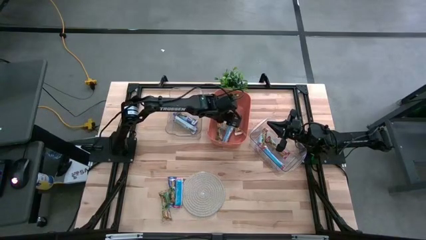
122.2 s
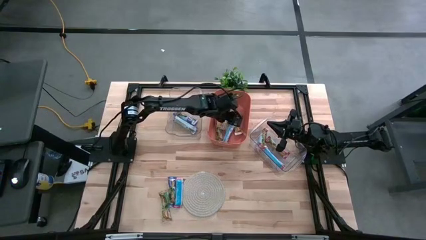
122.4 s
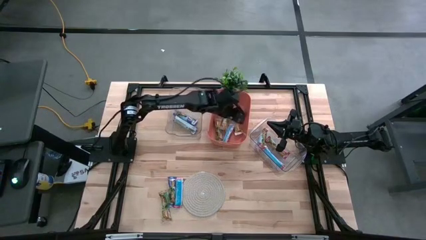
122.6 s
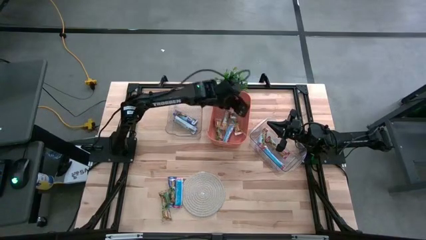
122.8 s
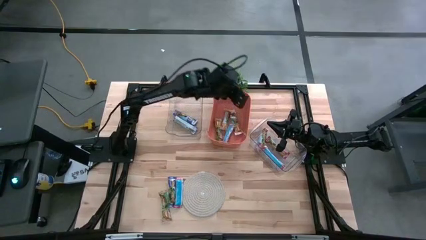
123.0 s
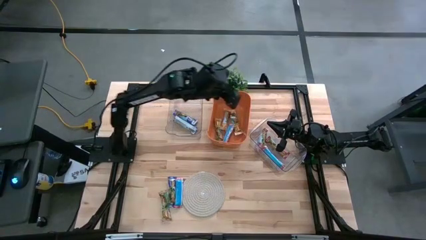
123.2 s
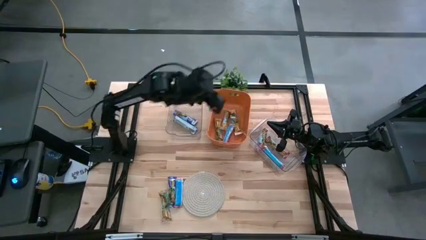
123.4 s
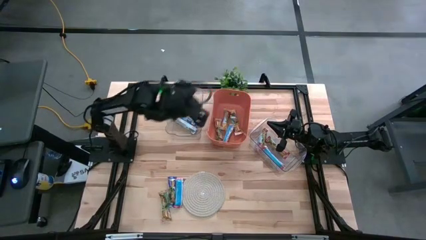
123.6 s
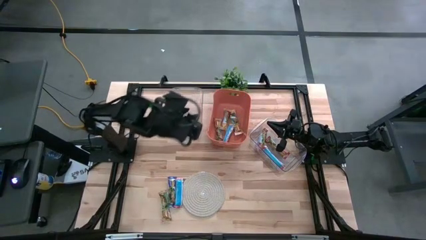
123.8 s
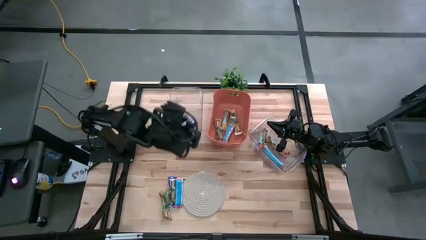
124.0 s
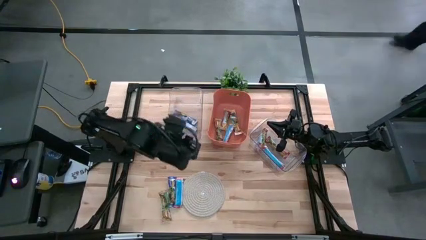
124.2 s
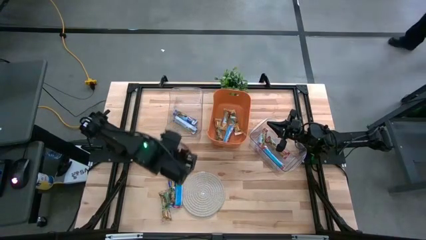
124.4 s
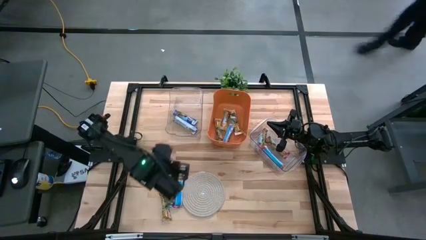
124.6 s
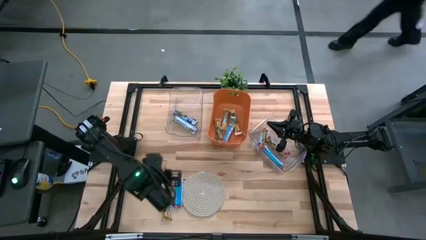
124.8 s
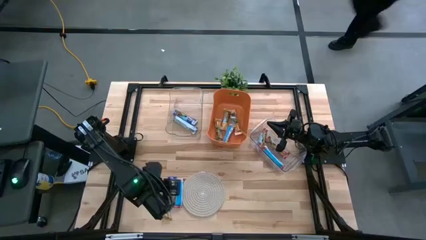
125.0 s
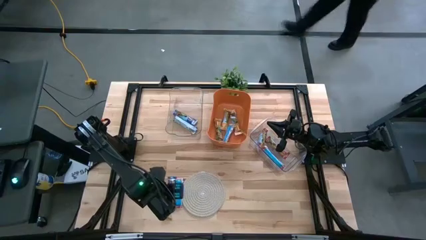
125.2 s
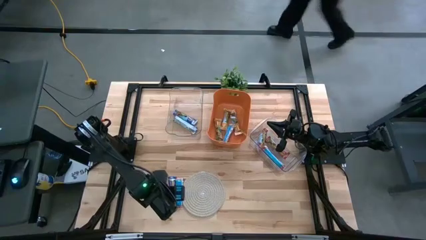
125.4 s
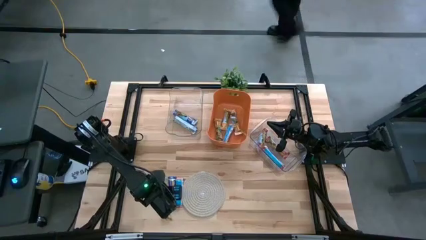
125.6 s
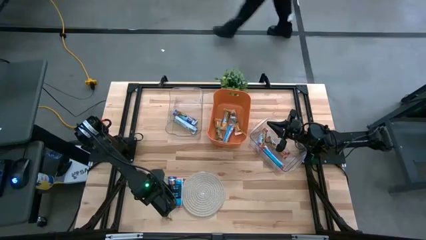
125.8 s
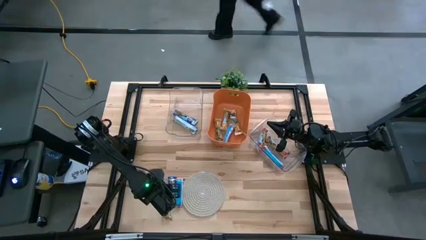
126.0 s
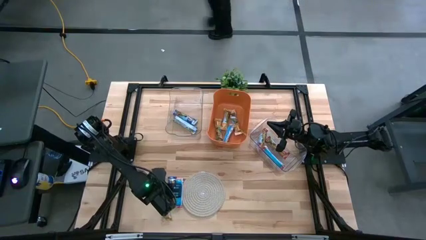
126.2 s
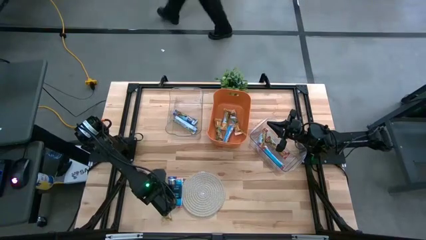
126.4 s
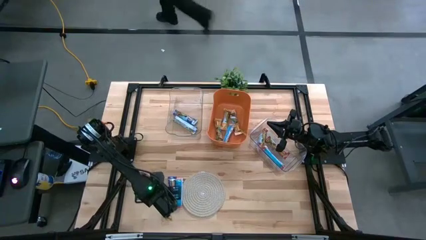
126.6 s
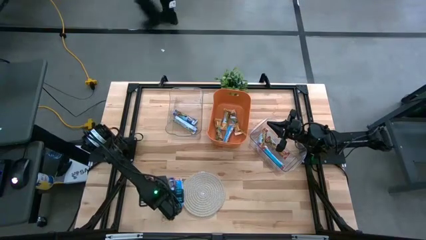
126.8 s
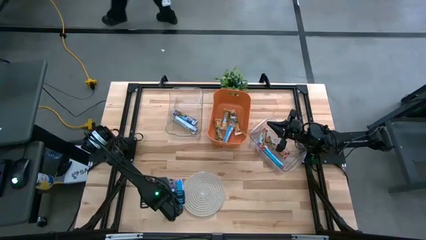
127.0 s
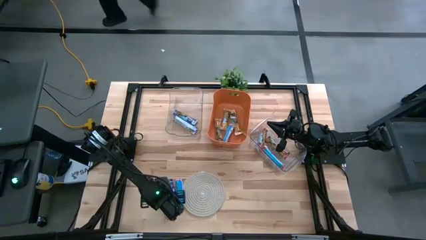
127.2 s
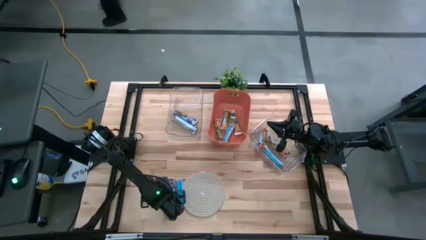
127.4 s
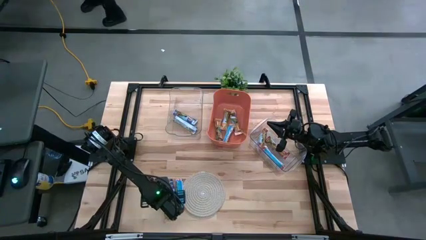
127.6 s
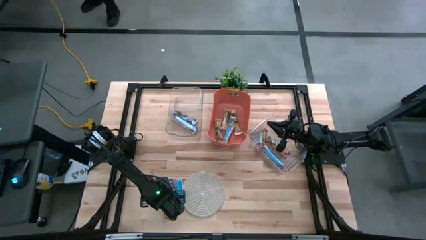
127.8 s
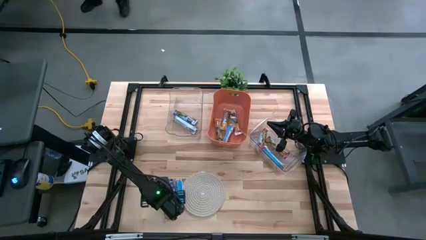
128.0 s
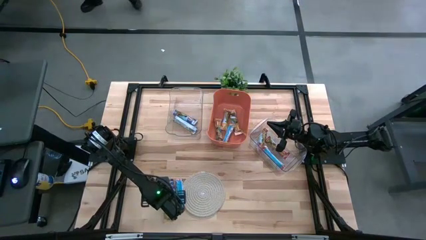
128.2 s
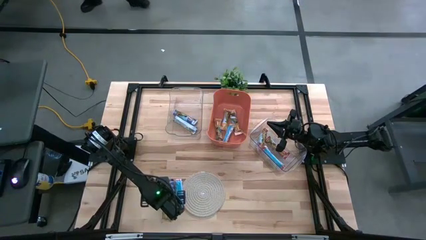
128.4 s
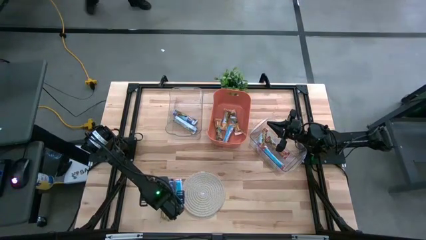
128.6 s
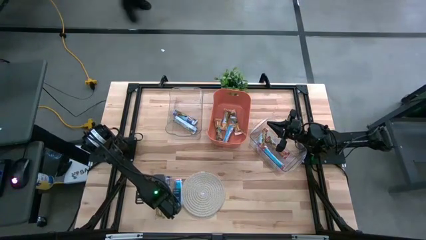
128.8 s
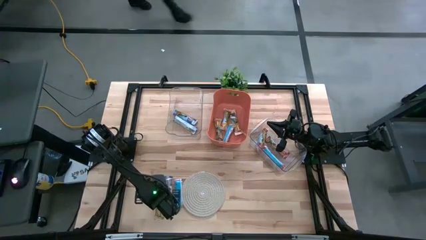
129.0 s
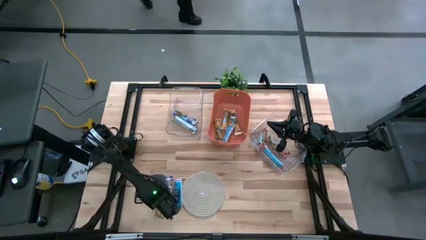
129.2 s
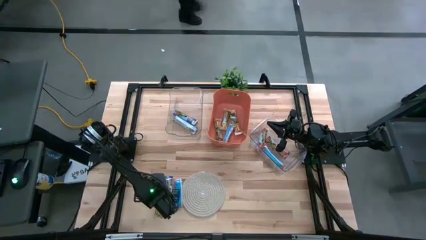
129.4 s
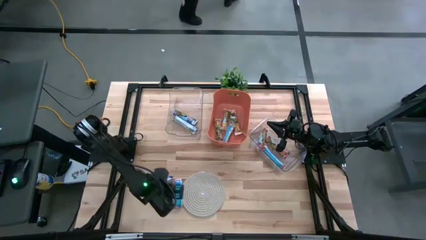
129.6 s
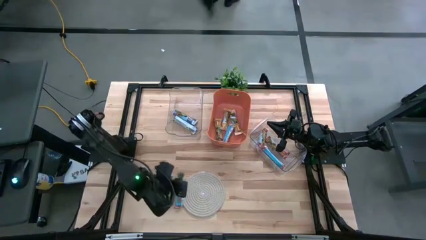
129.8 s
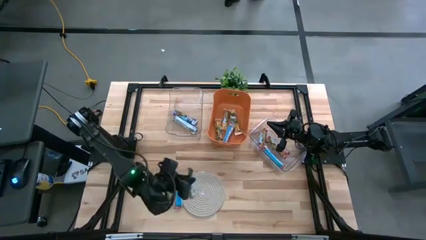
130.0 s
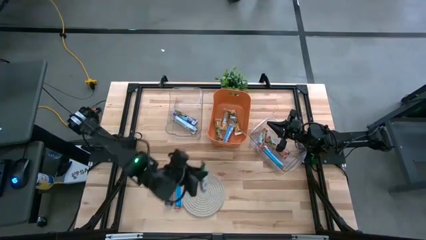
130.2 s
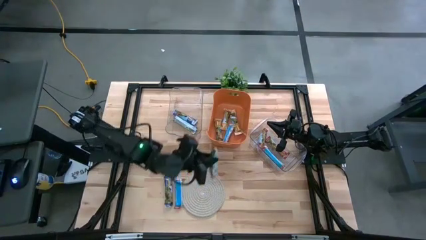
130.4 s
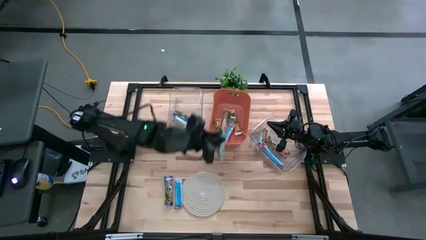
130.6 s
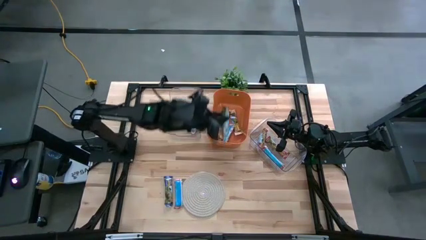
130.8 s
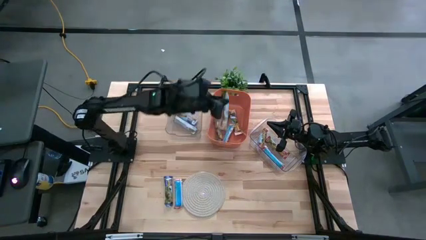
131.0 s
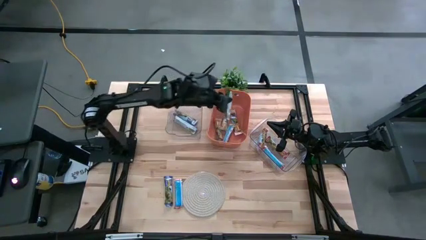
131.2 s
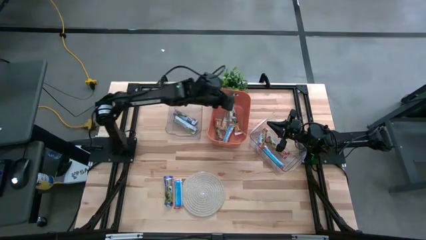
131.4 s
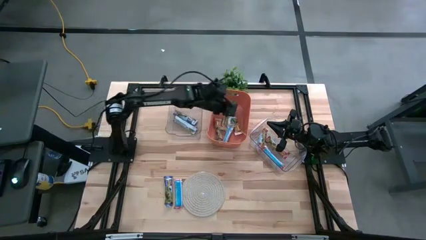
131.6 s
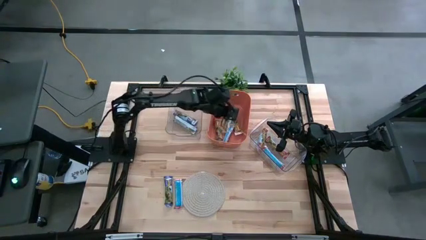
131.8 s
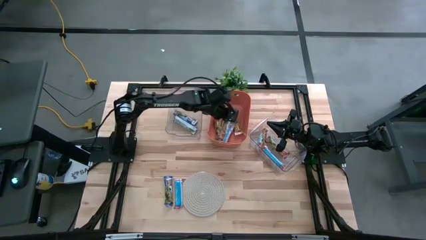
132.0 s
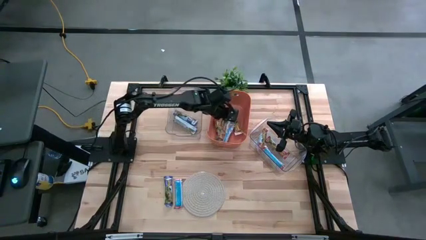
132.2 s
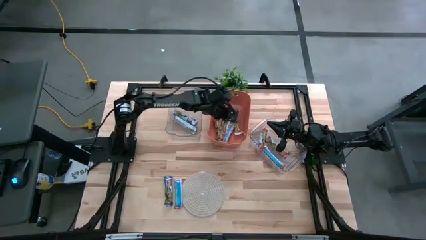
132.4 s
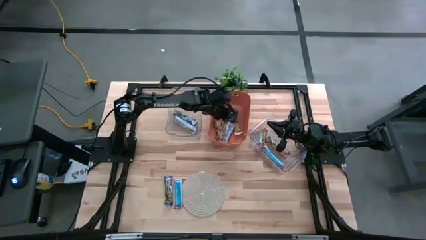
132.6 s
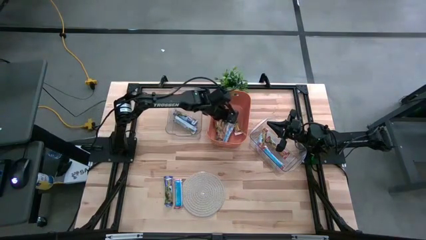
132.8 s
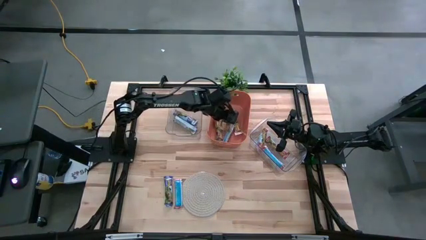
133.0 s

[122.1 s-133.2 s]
Task: Pick and place Granola Bars by type
Put the yellow granola bar into the orange bin

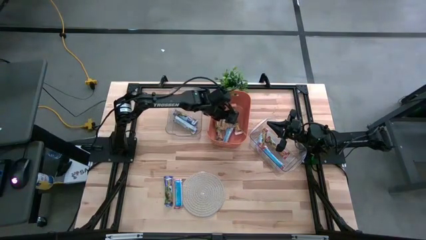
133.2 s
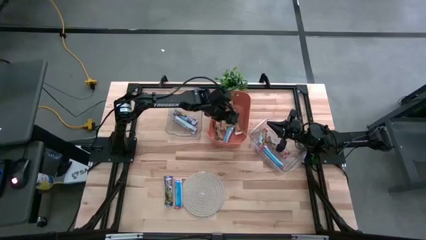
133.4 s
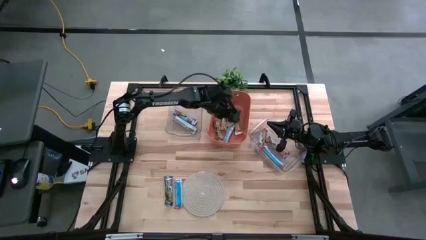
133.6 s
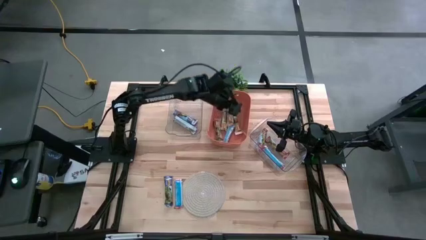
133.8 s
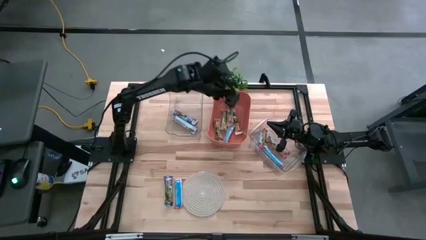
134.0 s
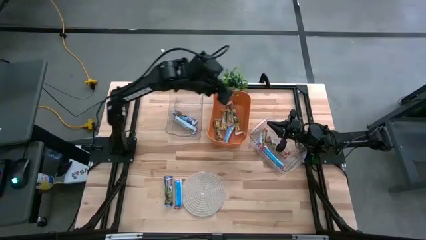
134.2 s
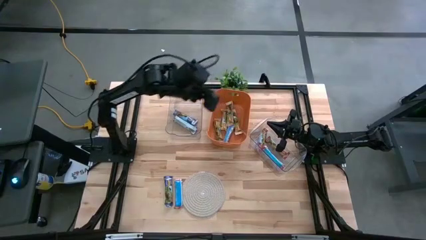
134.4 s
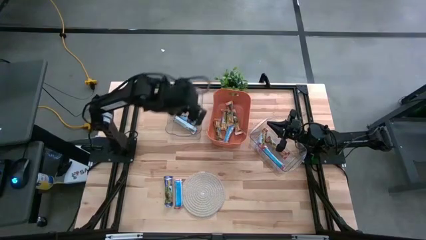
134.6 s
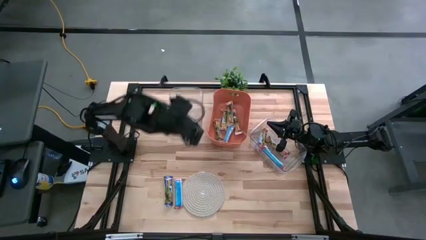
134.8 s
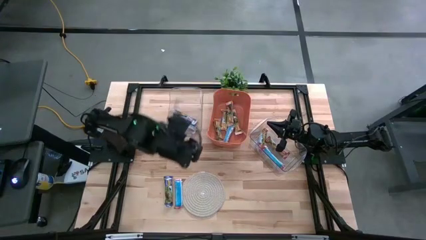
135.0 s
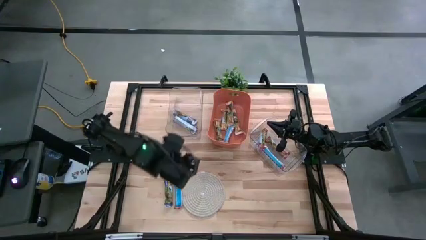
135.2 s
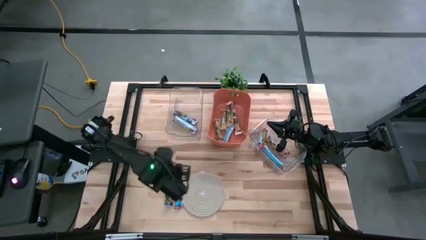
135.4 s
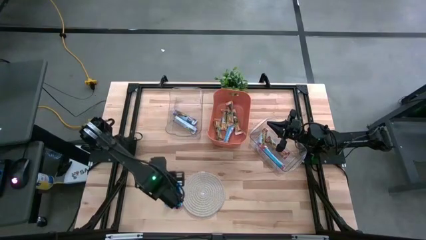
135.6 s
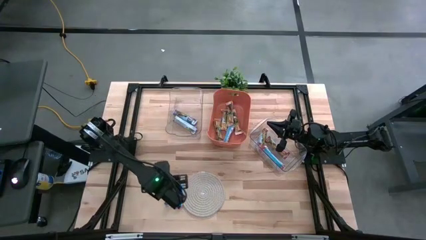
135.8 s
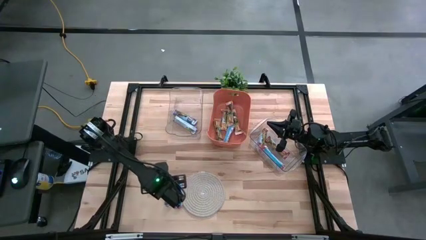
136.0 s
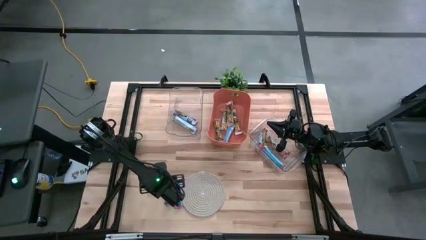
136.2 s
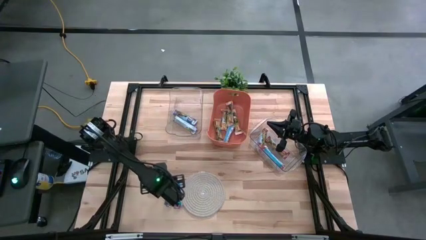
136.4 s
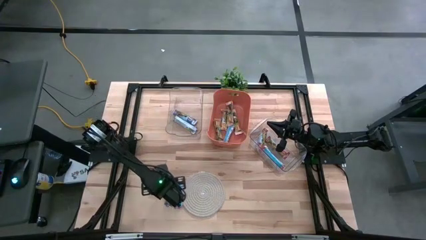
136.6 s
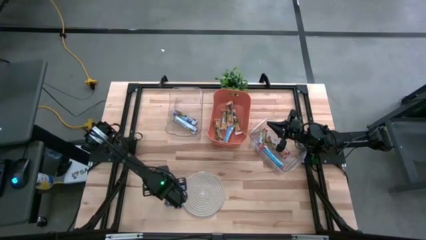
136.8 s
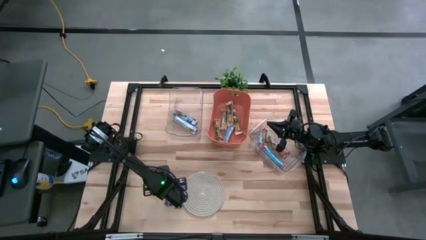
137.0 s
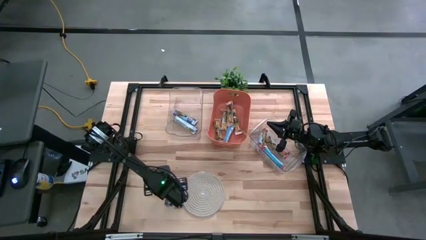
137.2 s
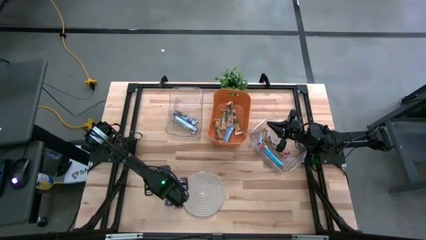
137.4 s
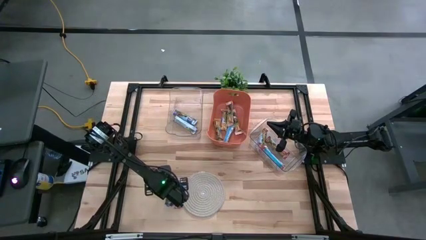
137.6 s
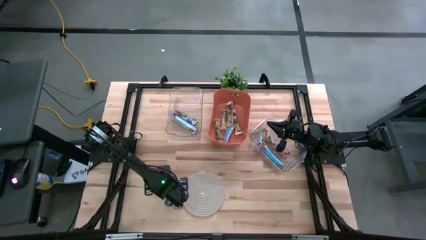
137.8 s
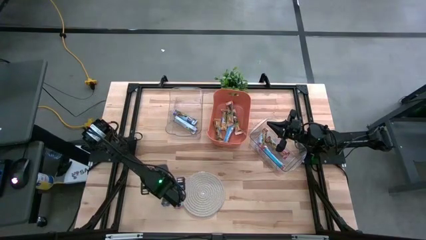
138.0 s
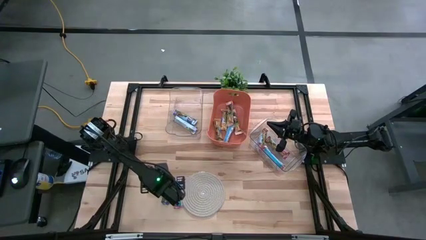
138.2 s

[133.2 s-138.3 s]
Put the blue granola bar into the left transparent bin
